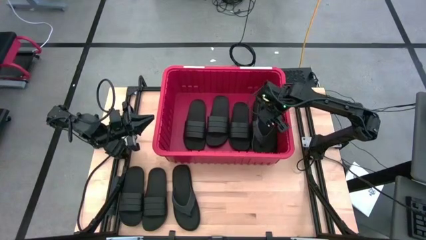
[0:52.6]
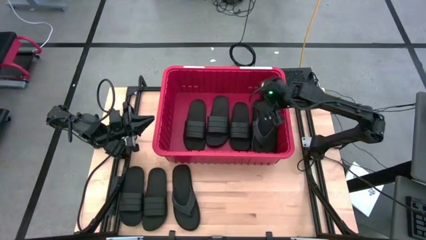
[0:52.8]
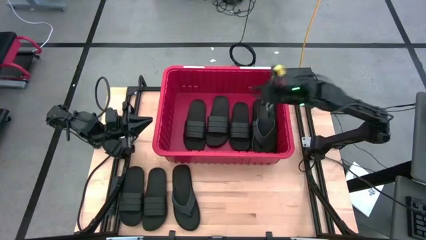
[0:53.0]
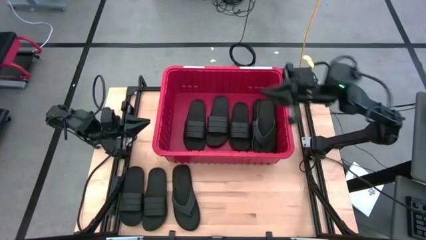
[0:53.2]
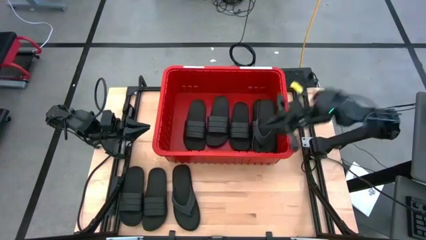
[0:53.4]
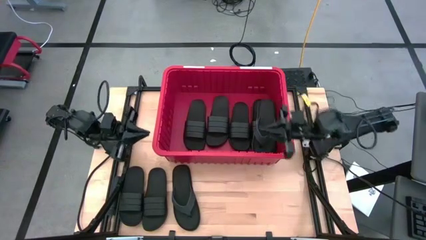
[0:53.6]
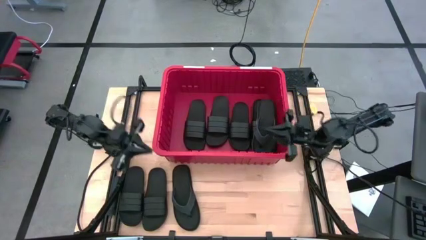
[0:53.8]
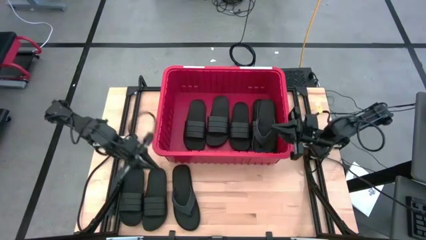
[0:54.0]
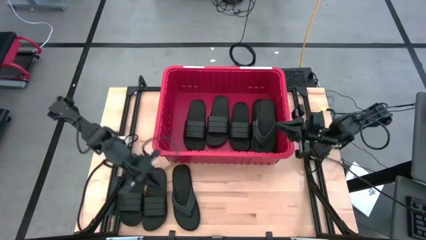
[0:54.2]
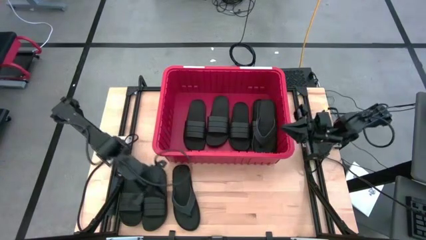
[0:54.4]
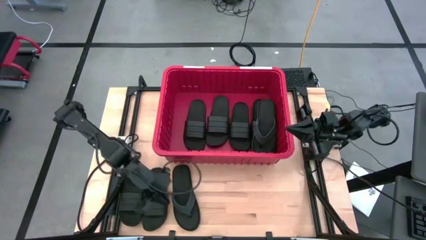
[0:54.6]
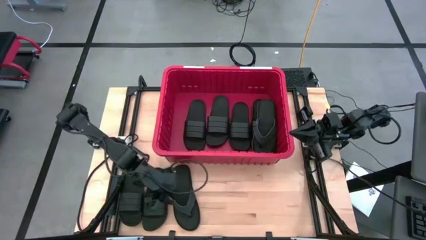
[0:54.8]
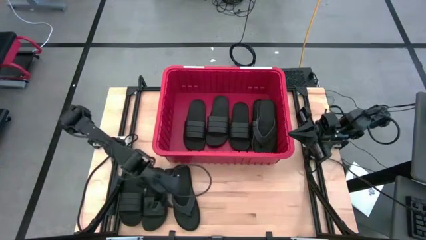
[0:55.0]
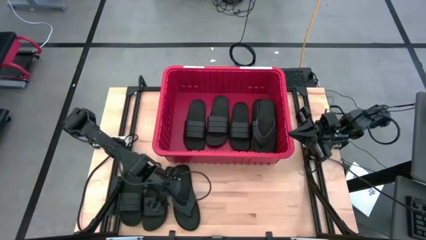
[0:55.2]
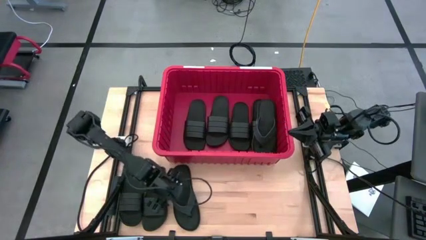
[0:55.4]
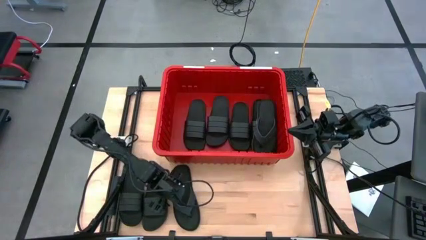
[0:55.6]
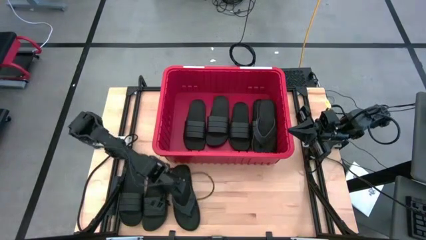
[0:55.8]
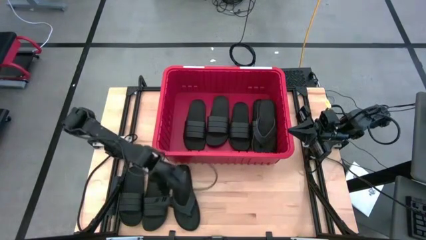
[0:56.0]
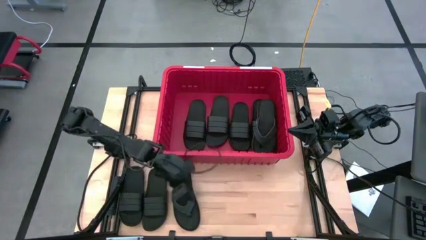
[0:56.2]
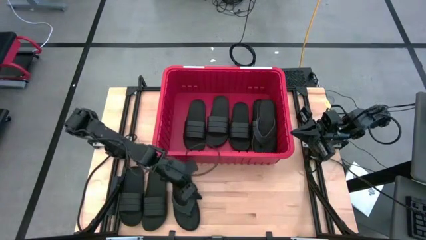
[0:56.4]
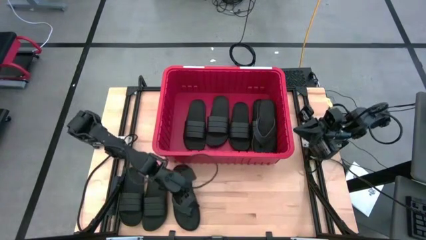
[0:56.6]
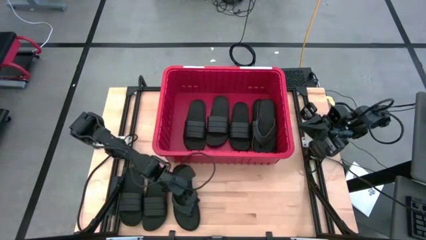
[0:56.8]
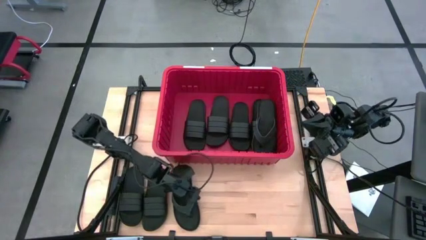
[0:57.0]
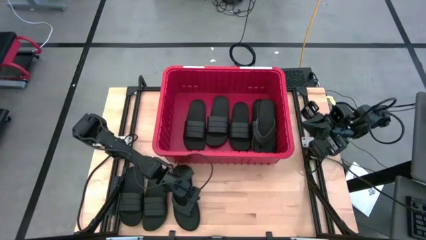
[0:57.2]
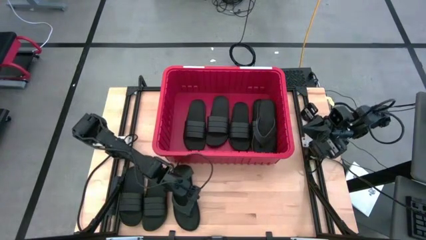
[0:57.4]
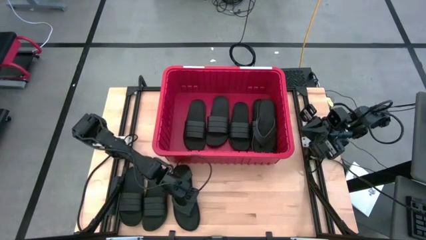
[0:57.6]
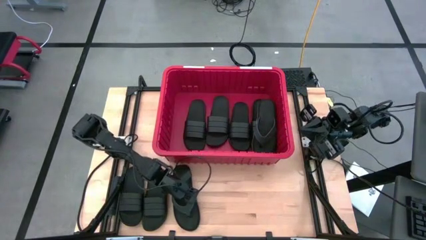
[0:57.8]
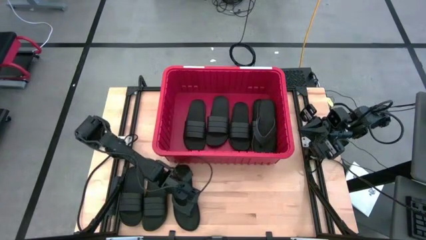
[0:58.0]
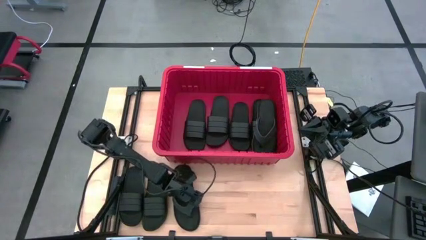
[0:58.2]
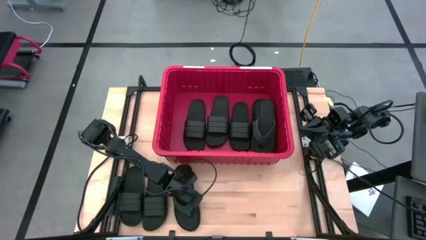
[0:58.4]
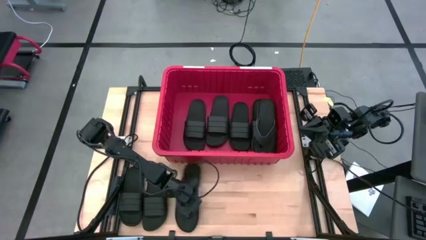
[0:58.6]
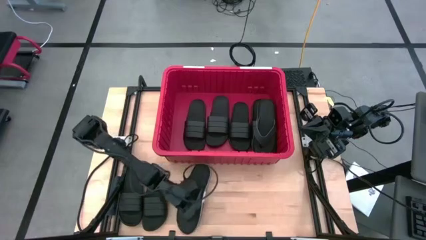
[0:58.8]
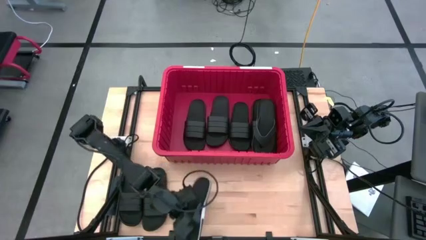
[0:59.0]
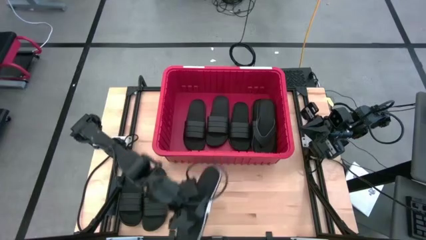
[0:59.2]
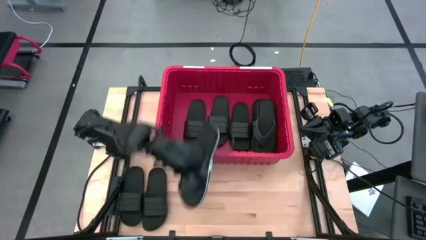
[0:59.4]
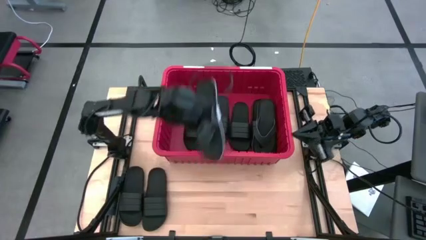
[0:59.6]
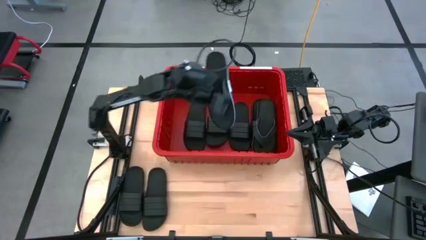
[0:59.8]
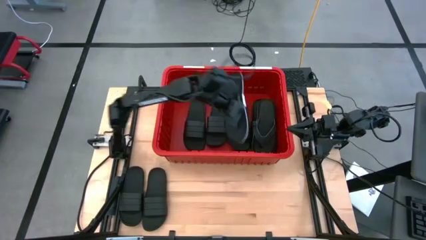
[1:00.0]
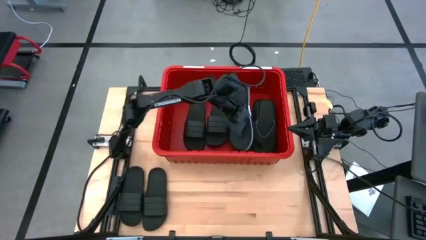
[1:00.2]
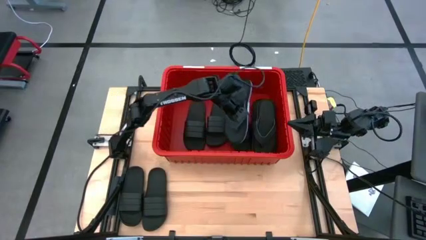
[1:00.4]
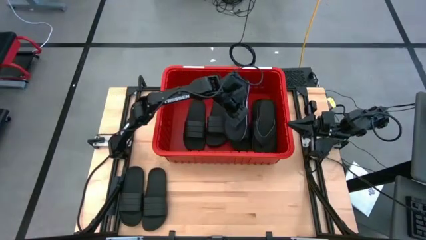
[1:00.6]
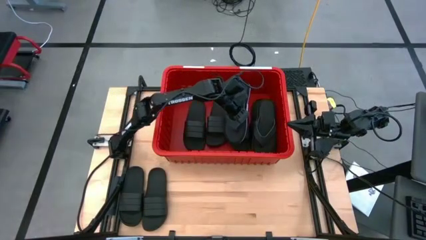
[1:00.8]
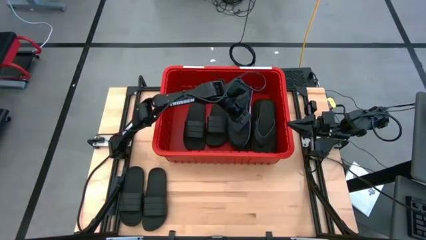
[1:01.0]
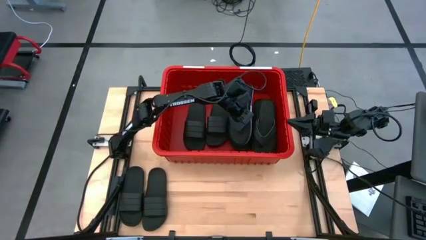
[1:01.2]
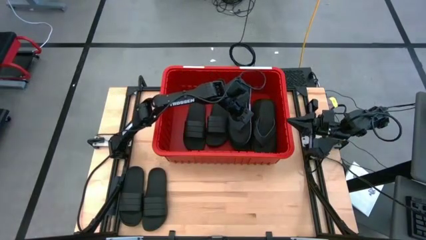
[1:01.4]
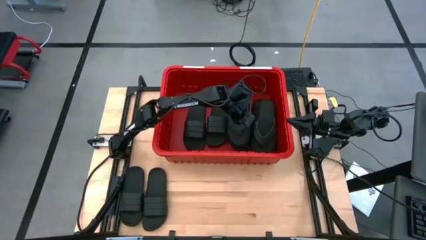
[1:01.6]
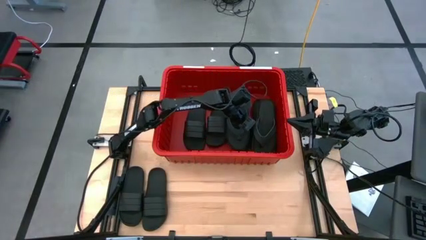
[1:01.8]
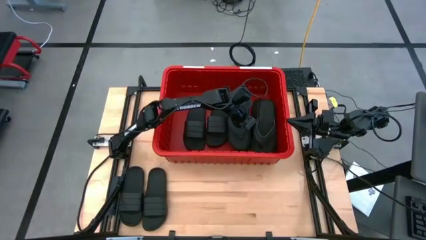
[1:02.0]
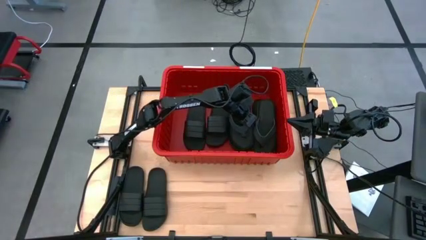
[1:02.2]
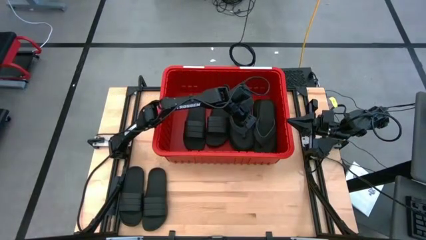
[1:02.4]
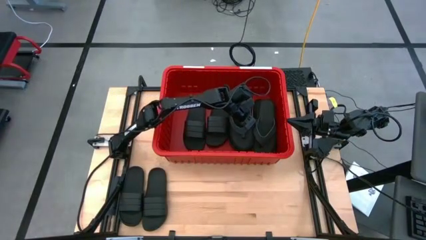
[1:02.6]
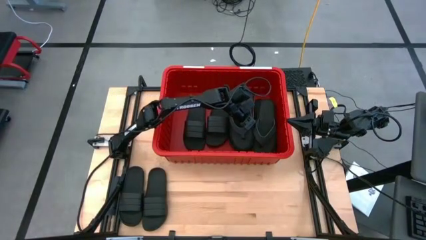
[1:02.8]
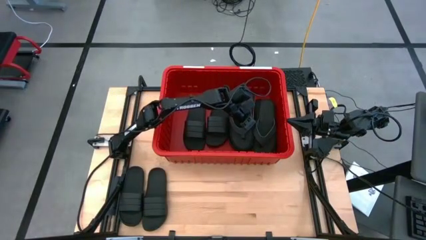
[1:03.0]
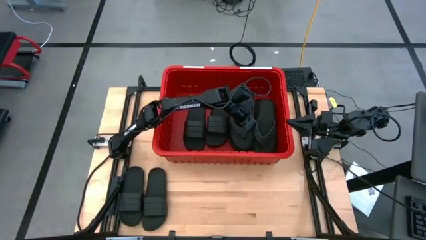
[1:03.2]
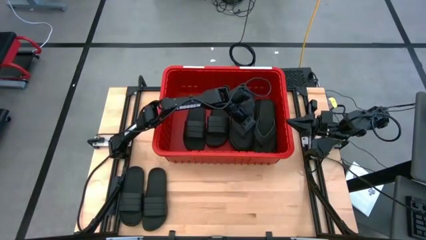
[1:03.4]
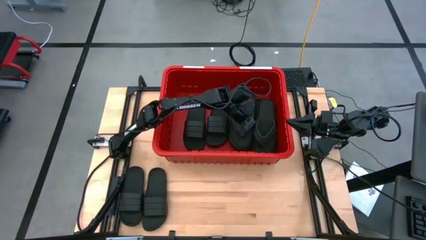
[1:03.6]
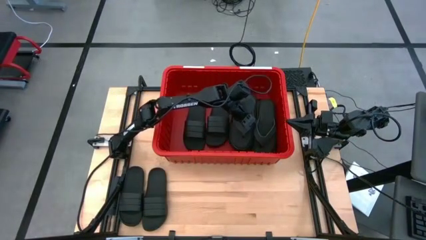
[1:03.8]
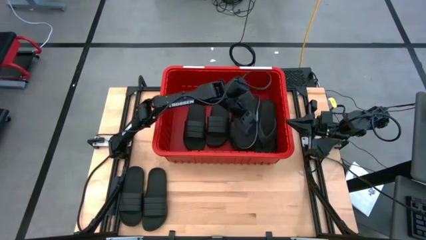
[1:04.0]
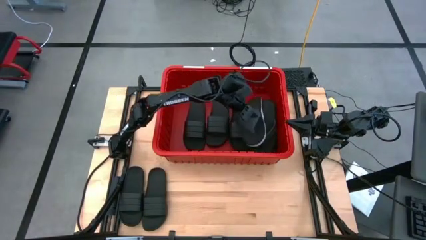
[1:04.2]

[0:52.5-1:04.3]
Task: Pick and place slides into bin
Put the right slipper into the bin

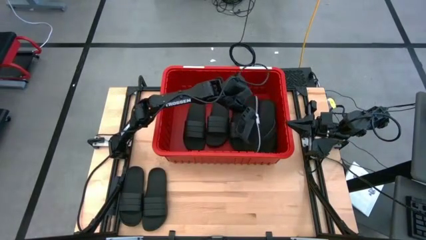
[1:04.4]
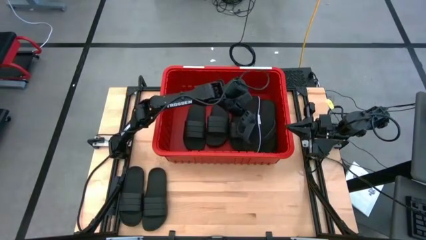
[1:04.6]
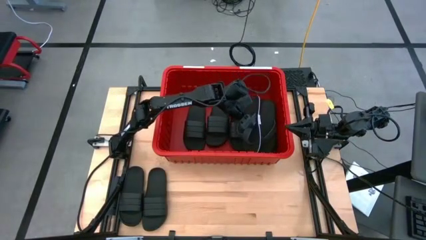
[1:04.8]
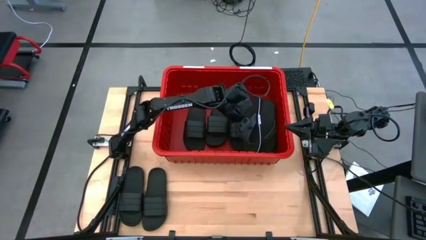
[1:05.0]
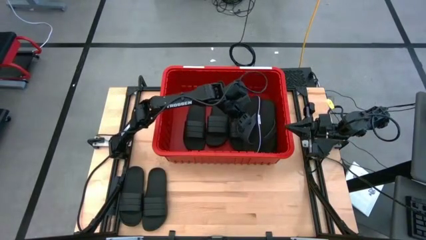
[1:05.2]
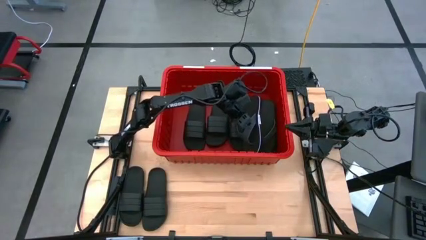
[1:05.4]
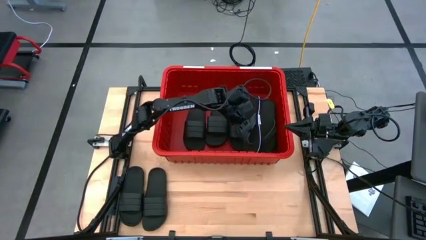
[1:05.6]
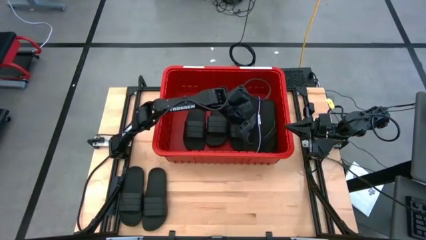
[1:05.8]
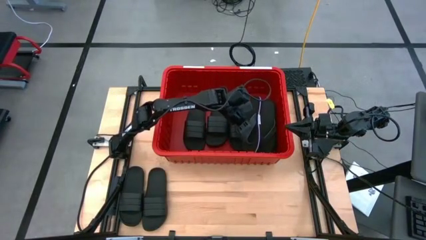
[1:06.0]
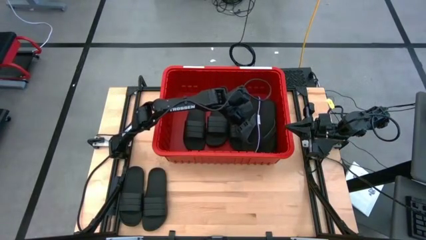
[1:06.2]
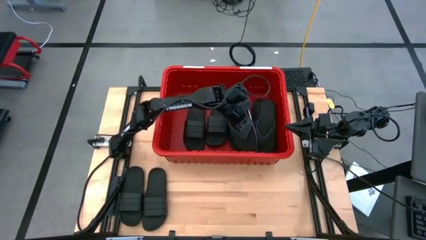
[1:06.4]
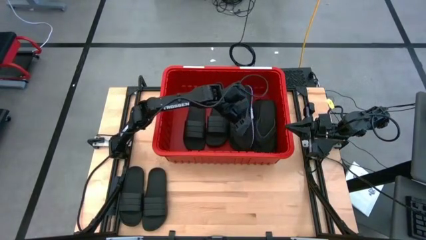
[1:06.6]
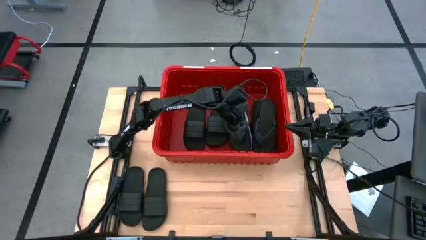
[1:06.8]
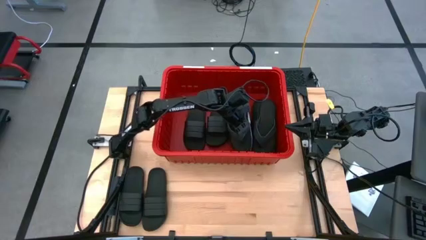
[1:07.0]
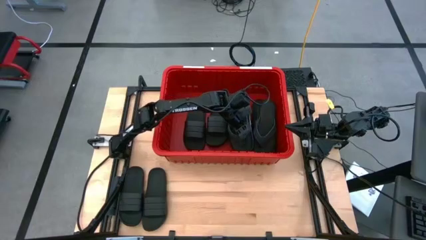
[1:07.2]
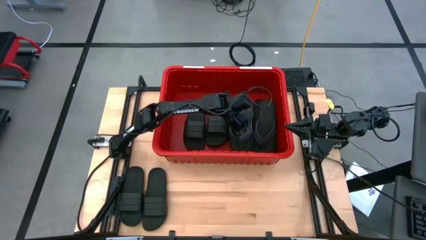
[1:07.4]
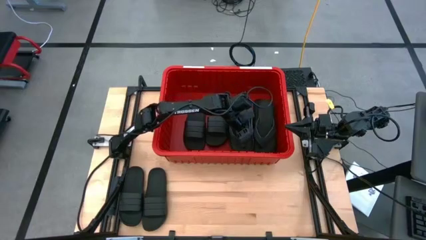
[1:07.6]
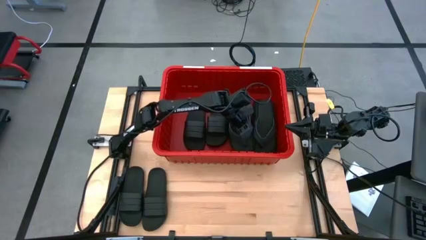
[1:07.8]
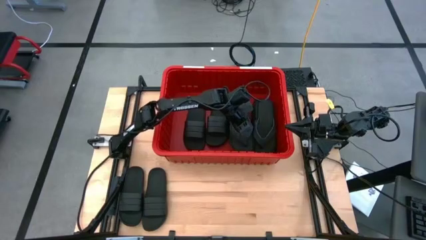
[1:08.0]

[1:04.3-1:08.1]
Put the right slipper into the bin
